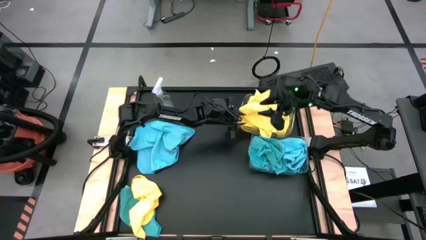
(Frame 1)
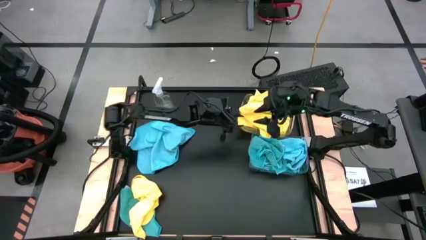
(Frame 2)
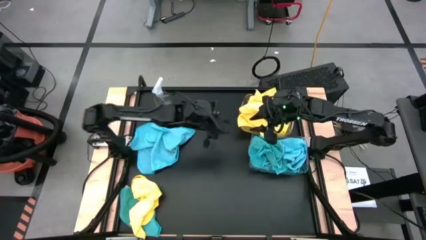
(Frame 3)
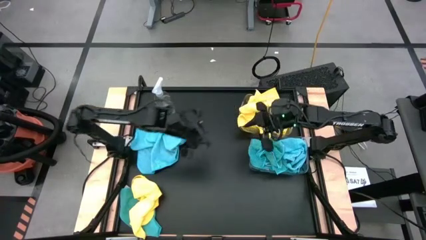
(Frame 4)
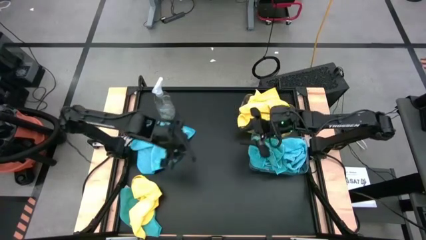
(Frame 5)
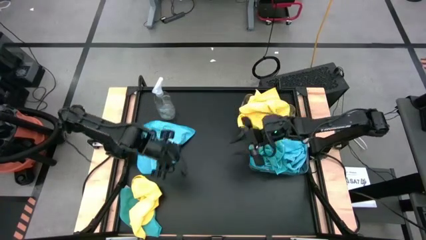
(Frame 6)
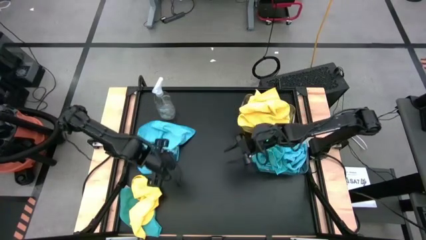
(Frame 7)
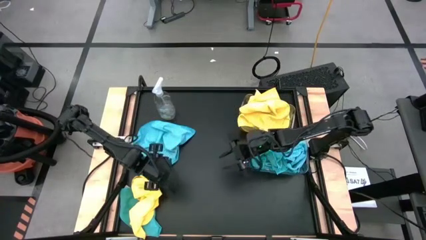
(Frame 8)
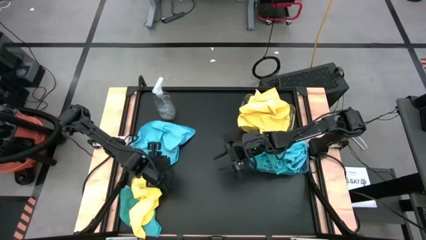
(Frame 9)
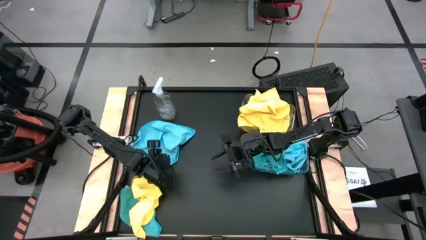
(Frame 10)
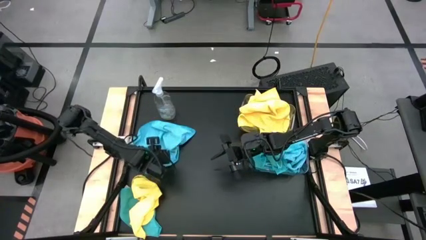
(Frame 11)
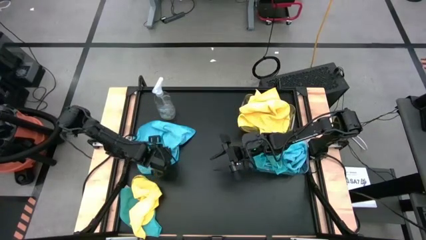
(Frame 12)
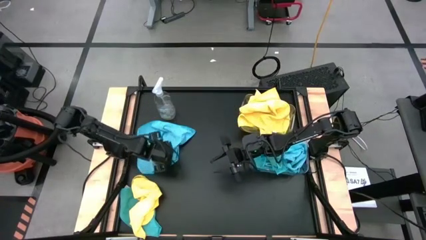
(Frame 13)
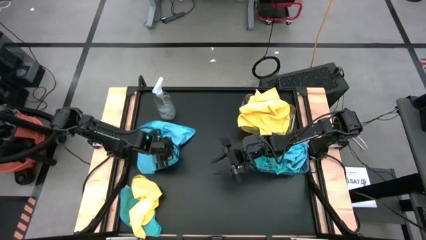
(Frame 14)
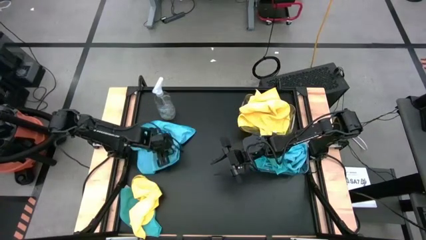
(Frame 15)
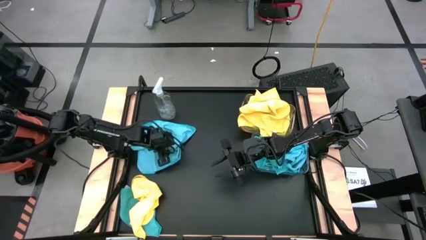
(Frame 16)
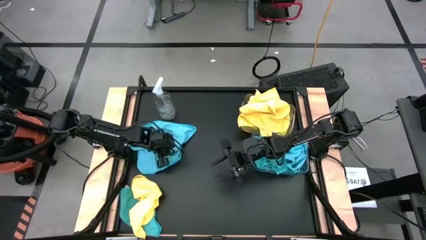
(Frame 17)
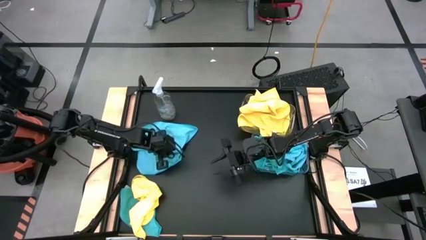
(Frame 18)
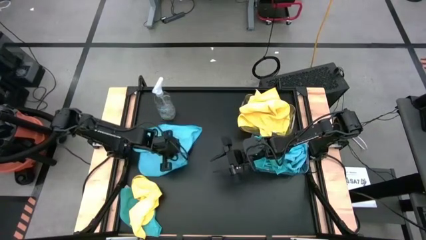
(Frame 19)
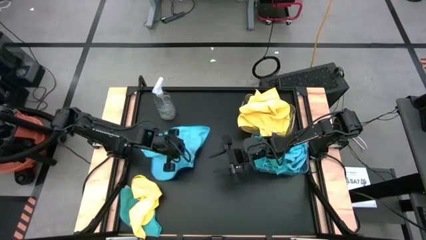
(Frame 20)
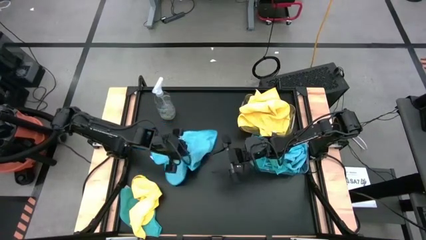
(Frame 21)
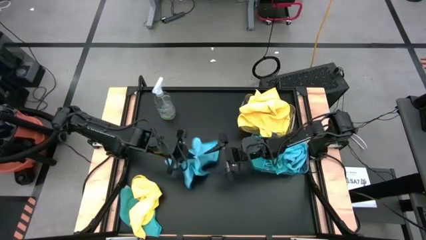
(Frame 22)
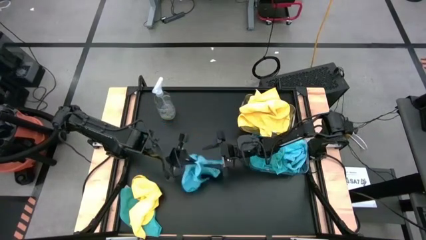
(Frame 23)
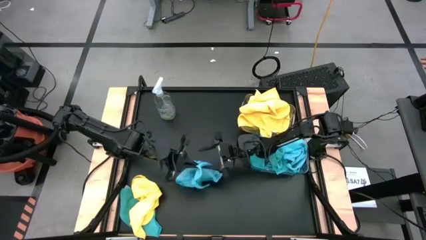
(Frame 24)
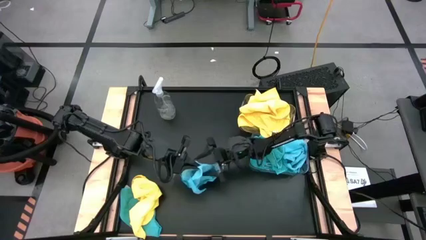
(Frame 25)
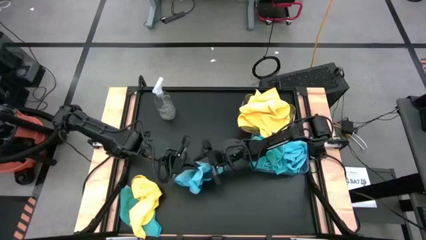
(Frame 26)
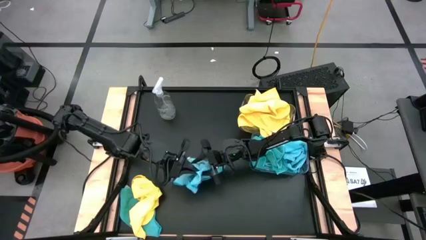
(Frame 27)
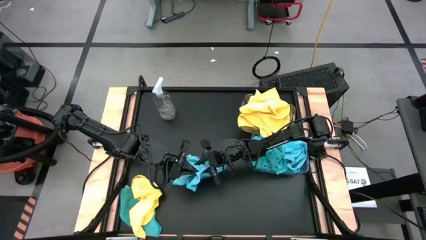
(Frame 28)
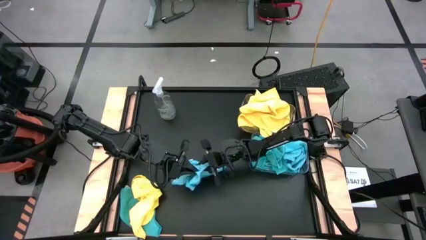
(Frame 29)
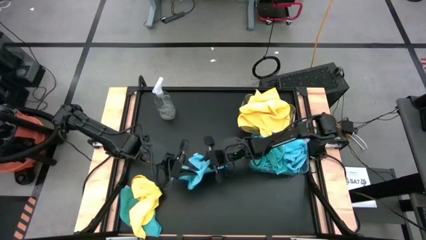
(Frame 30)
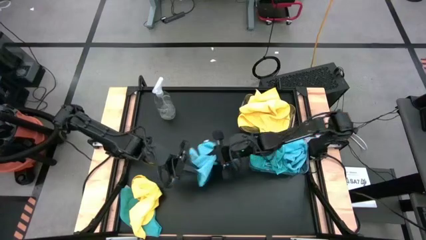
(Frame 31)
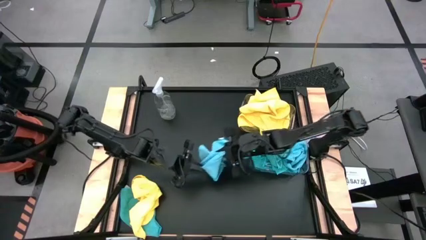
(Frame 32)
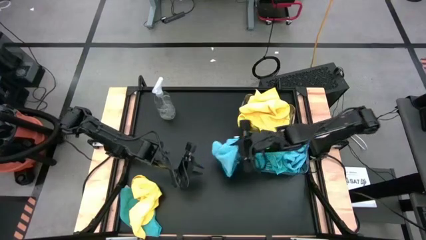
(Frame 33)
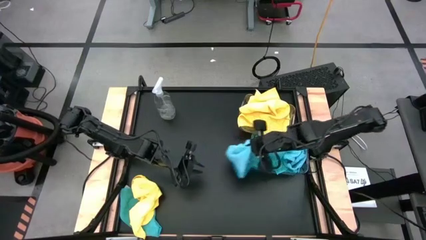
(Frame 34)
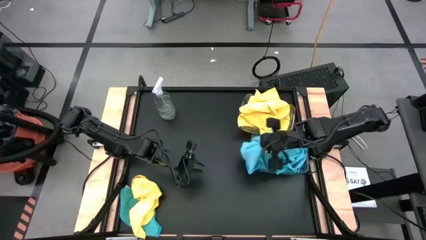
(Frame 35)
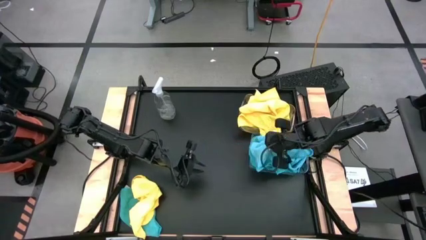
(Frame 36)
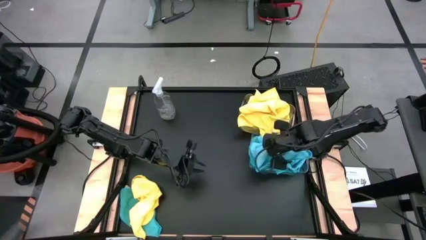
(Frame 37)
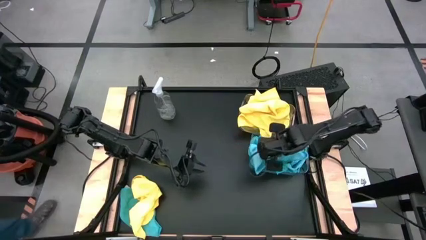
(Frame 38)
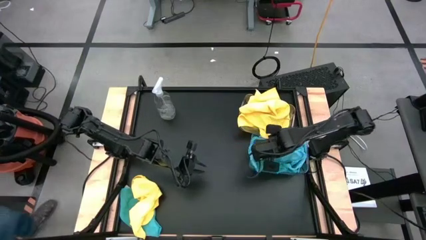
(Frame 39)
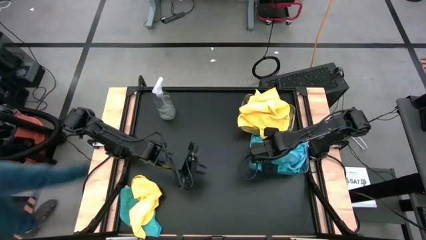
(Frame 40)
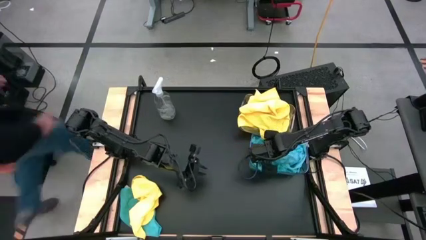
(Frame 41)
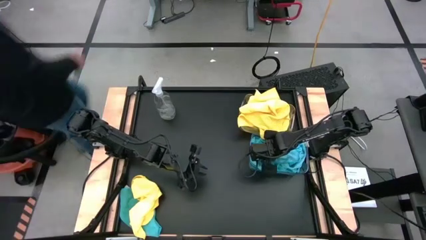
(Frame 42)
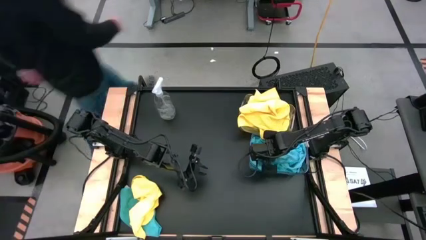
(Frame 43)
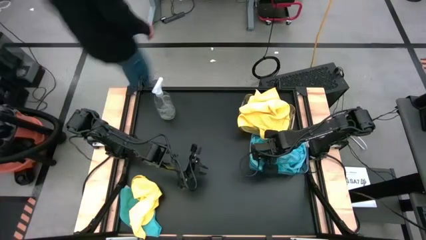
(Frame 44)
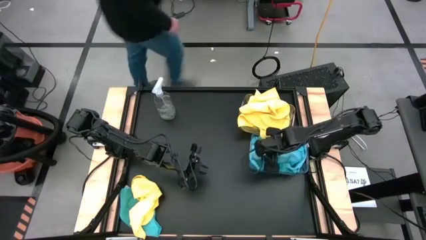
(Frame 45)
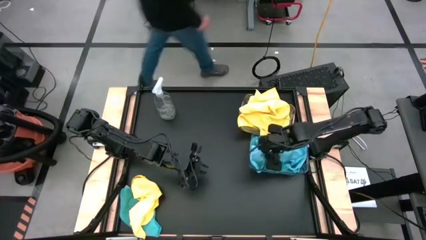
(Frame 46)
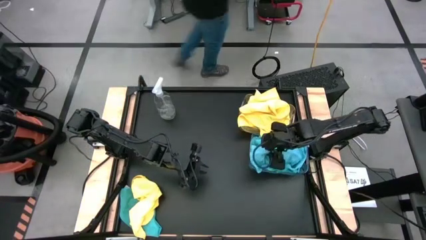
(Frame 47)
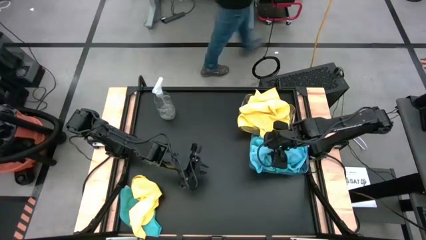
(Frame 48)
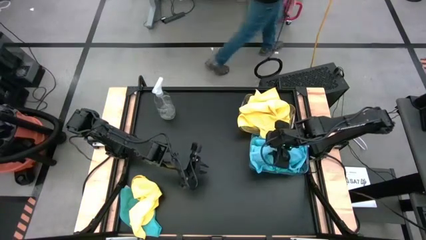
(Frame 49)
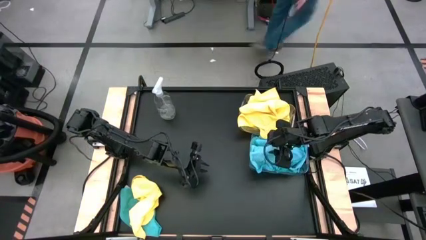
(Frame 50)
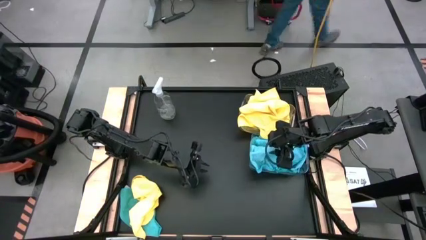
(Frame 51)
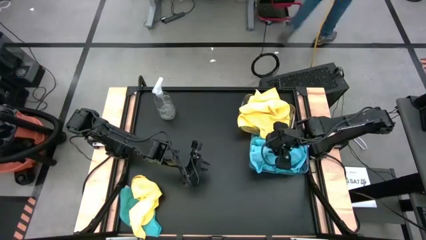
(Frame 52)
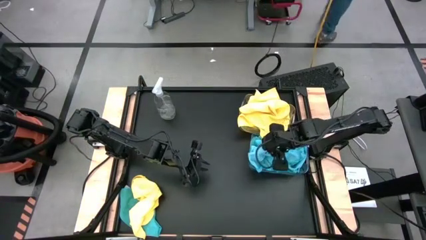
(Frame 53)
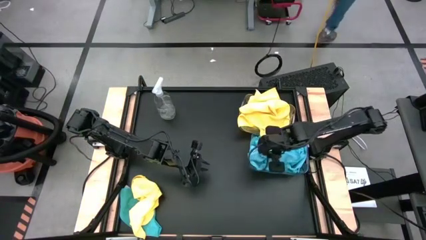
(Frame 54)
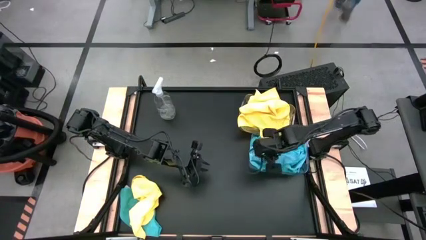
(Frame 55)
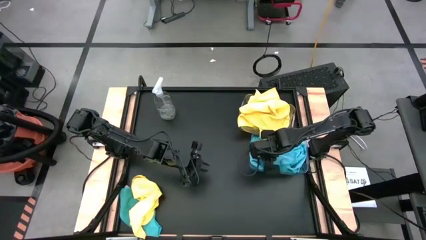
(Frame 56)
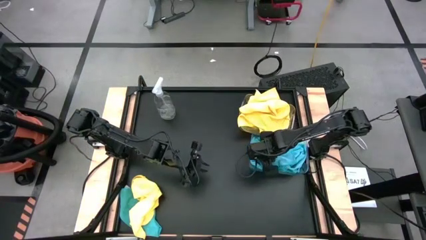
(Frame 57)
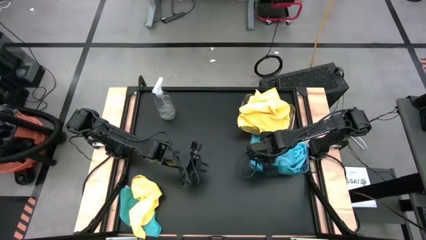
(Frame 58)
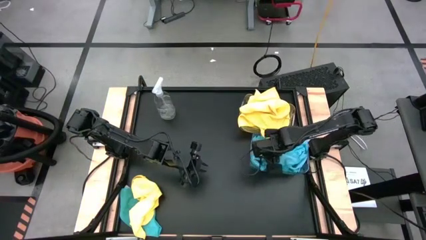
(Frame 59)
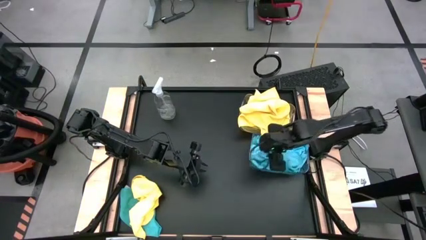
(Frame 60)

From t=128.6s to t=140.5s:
Task: Sort microfiber towel by color & place in baskets
Put the blue microfiber towel into the bottom transparent bin
